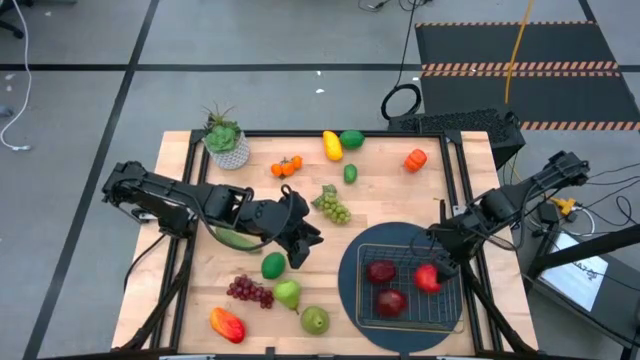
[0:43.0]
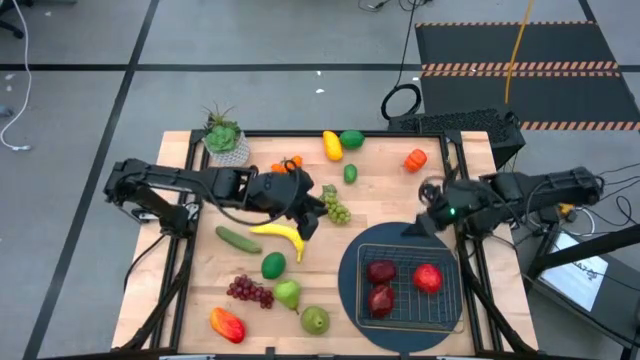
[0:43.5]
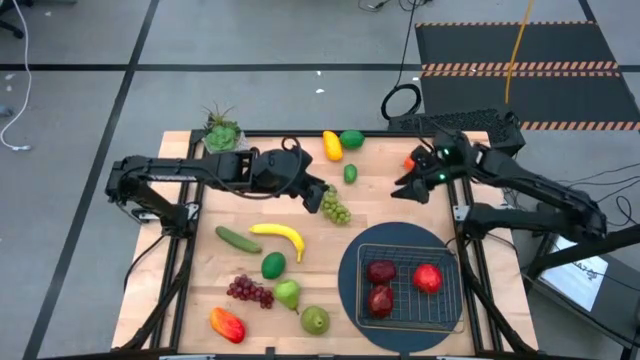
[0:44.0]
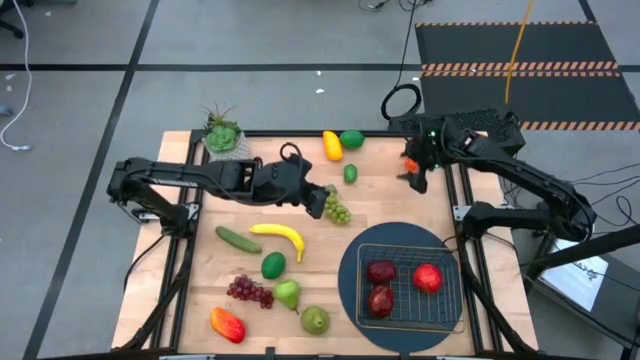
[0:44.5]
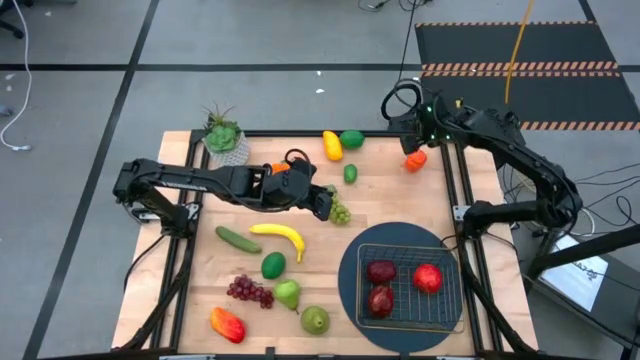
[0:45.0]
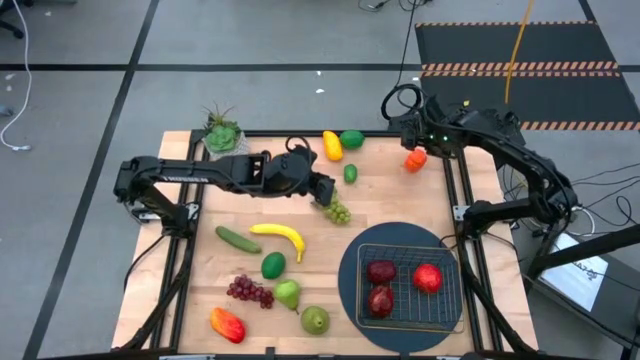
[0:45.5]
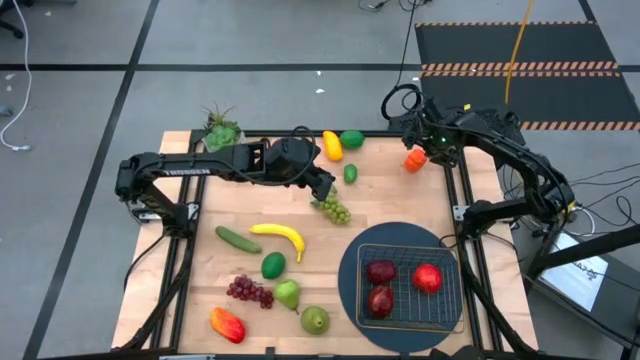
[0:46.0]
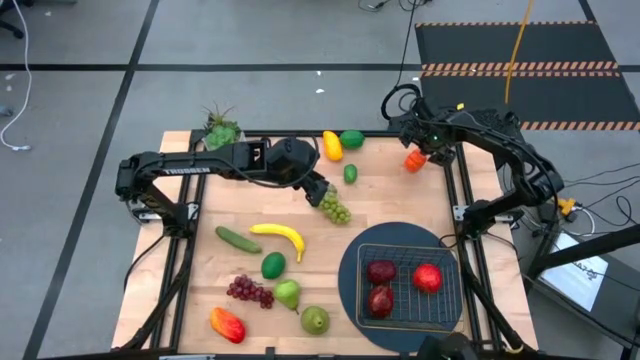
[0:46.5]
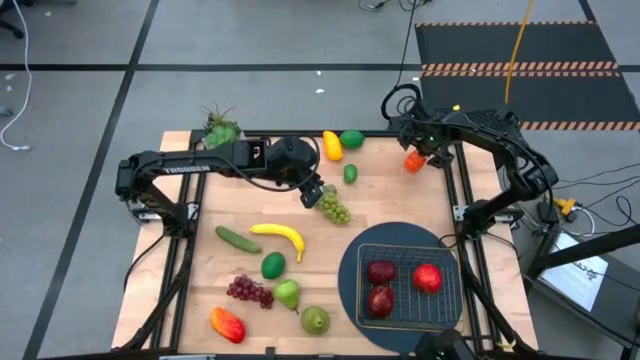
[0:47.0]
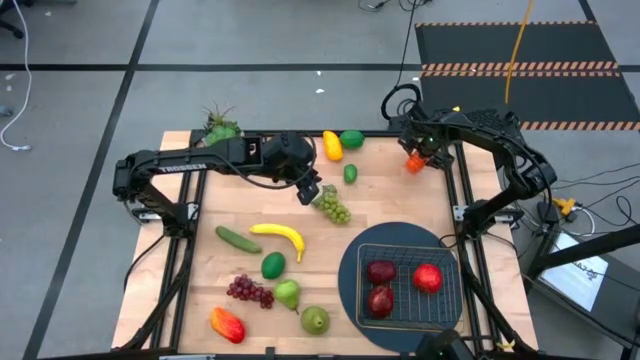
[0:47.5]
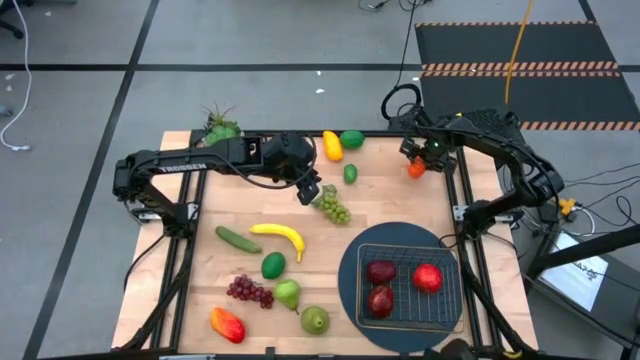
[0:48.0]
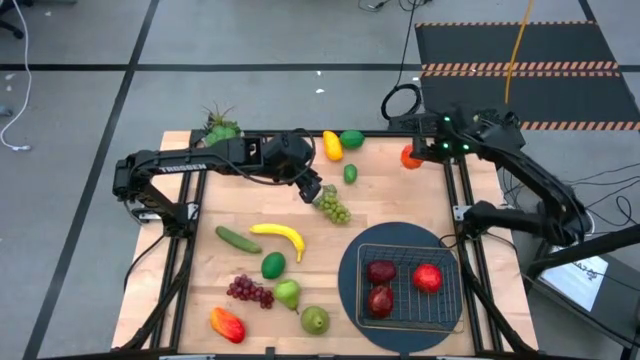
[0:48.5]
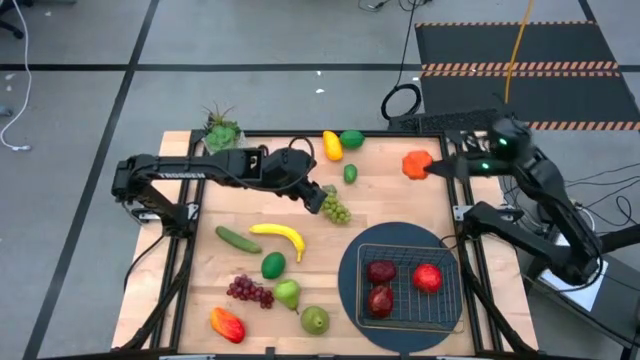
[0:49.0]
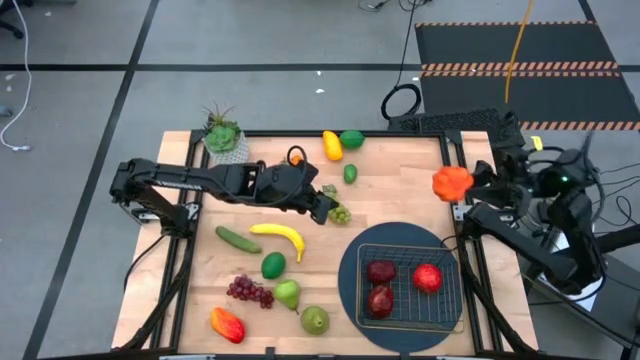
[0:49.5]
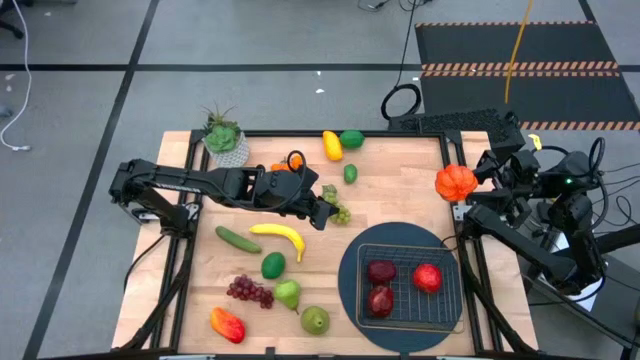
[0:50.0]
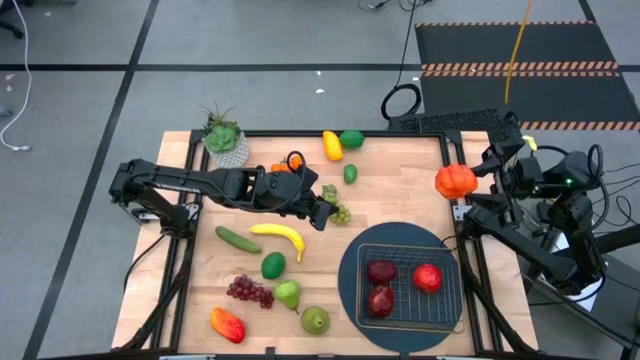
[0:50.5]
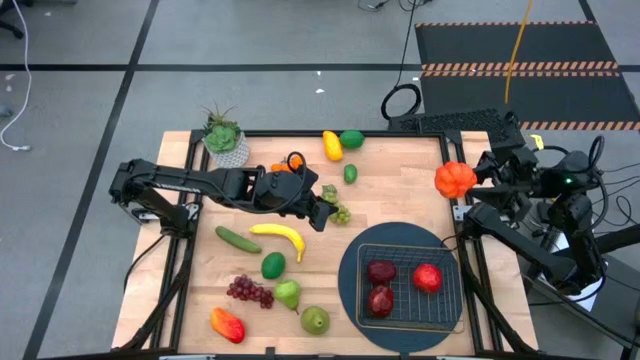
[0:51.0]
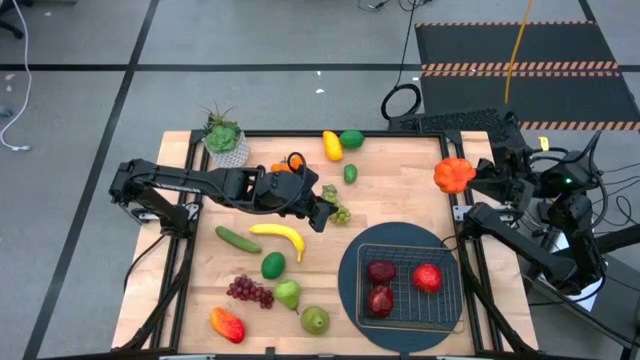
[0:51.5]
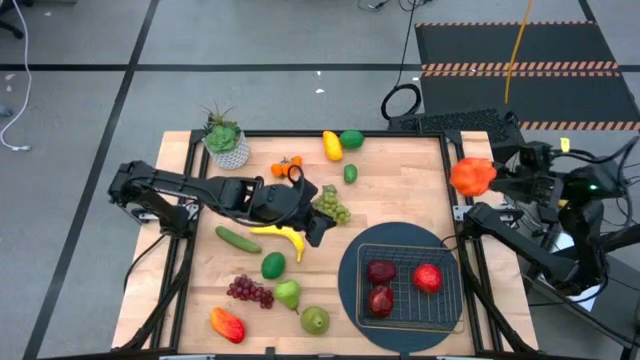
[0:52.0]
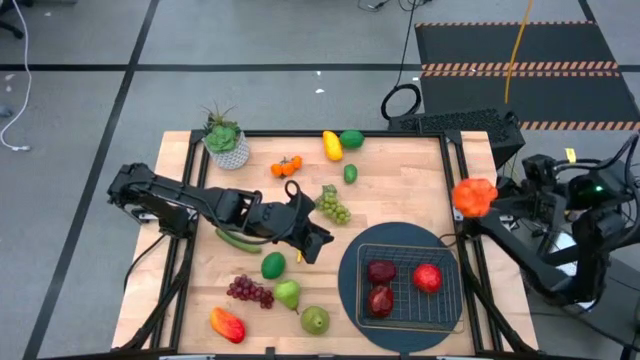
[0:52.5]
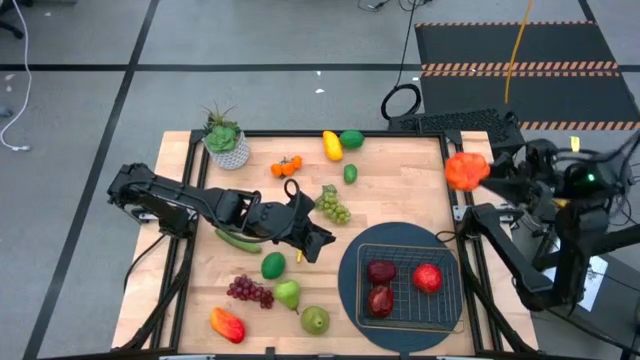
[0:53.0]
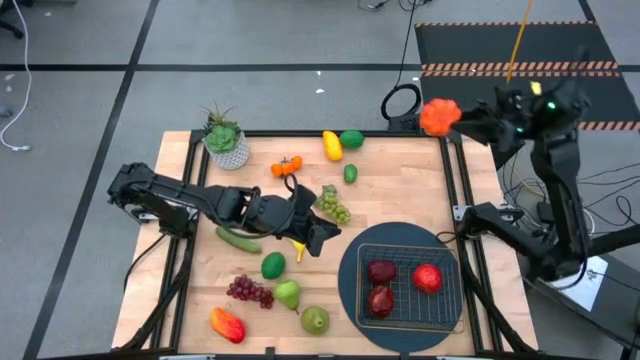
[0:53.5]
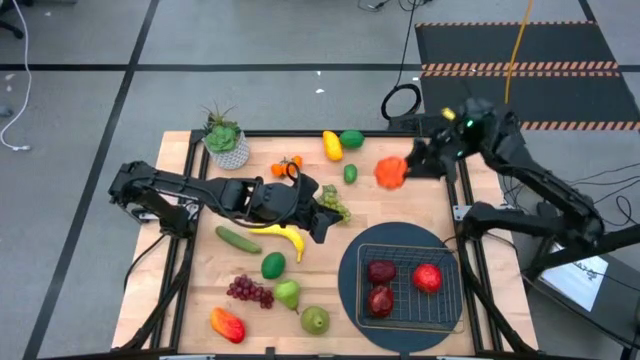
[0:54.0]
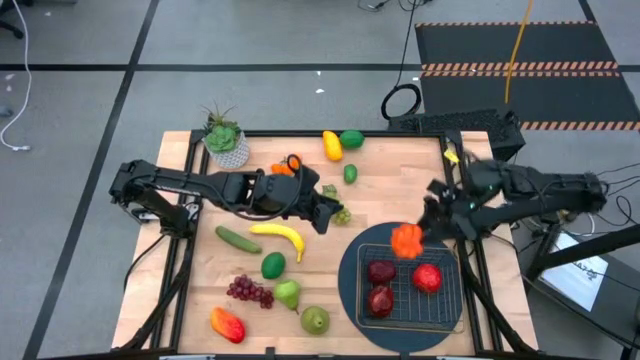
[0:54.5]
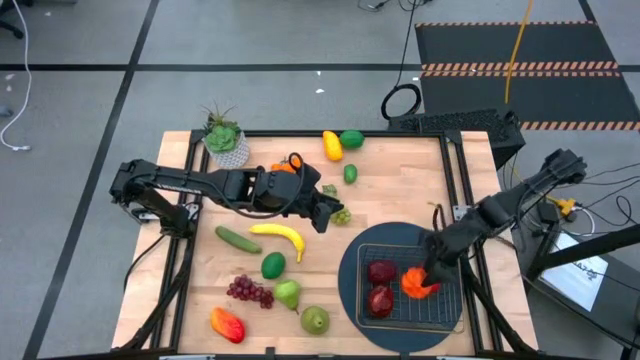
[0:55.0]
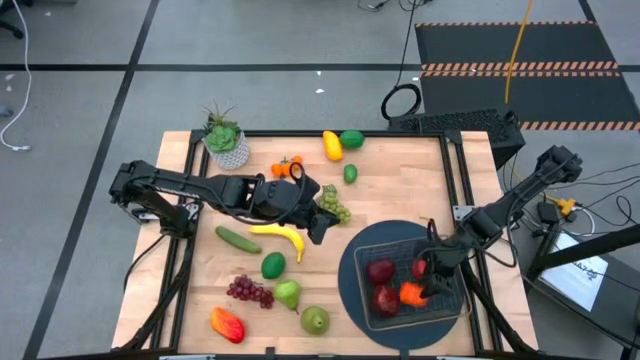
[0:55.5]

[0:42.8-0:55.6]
Task: Build produce basket
Put the pumpkin into the gold wire basket

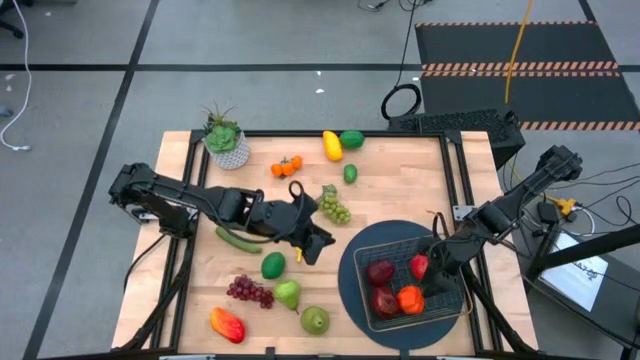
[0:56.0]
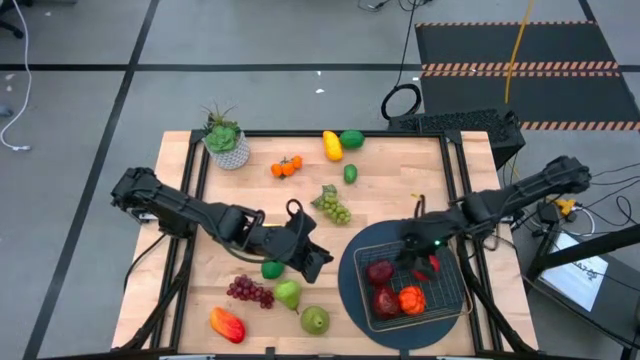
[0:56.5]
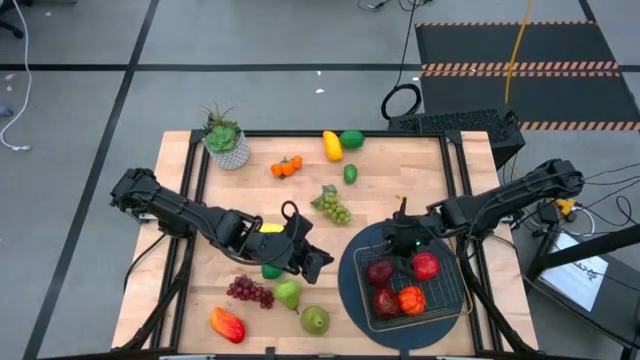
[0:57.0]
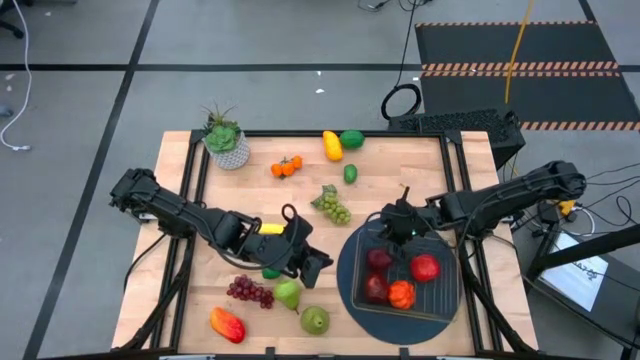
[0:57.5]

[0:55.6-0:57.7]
Adjust the gold wire basket on the blue placemat

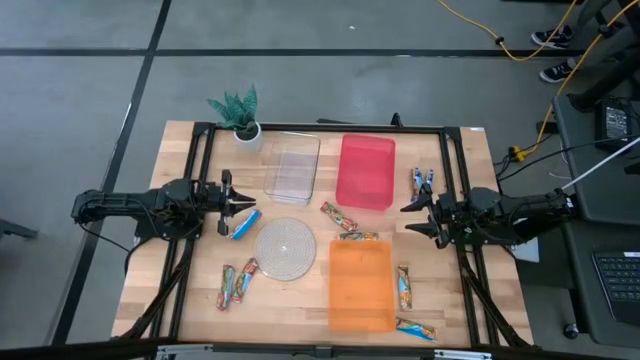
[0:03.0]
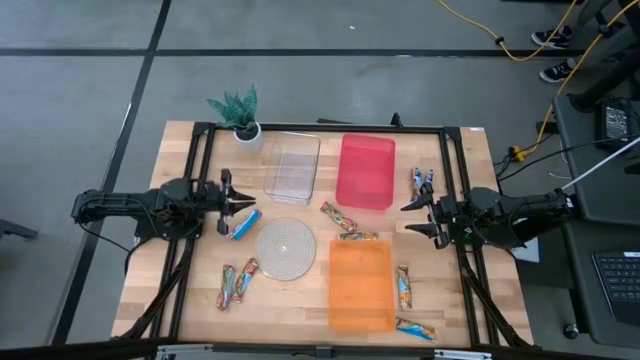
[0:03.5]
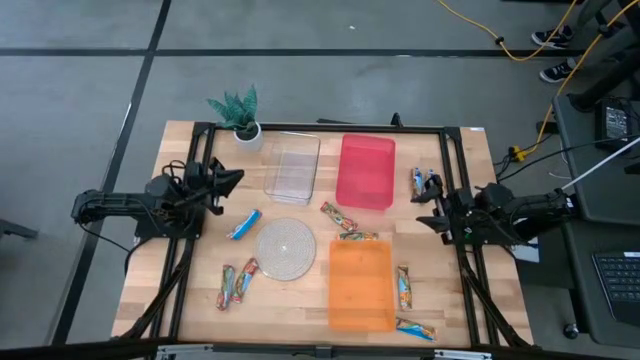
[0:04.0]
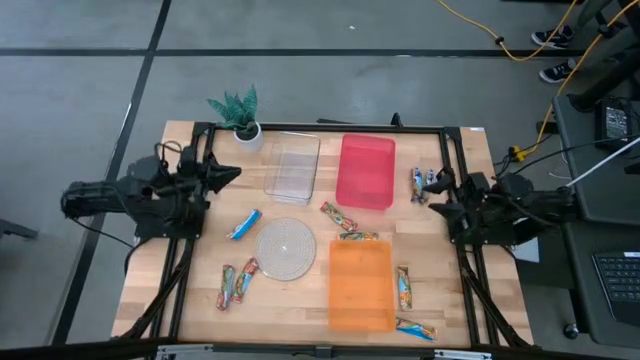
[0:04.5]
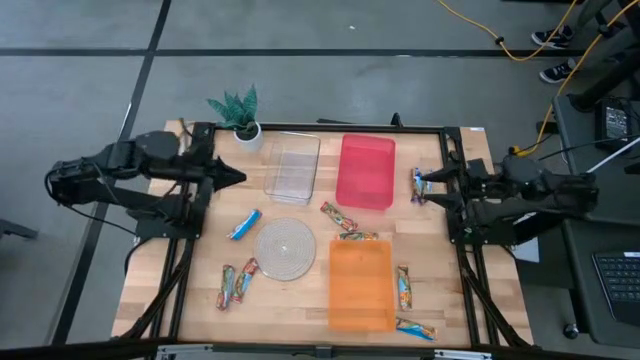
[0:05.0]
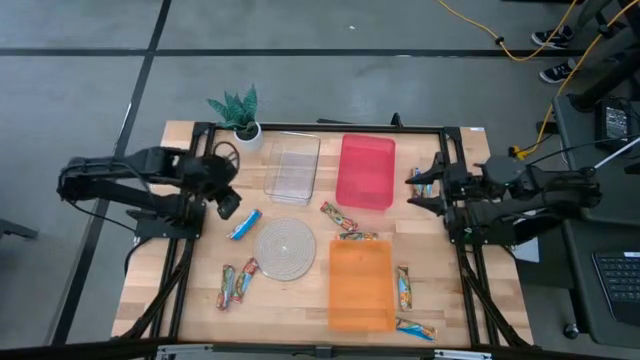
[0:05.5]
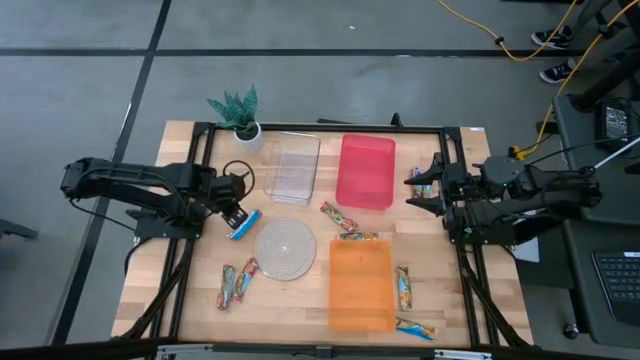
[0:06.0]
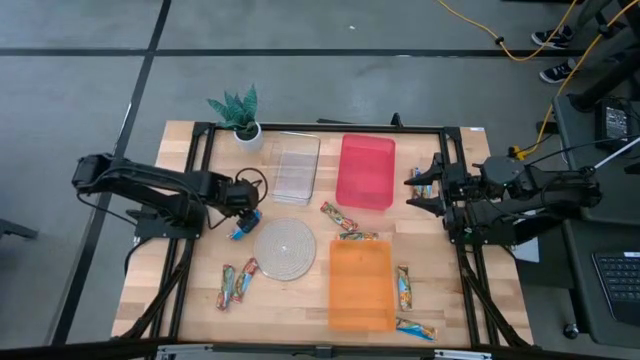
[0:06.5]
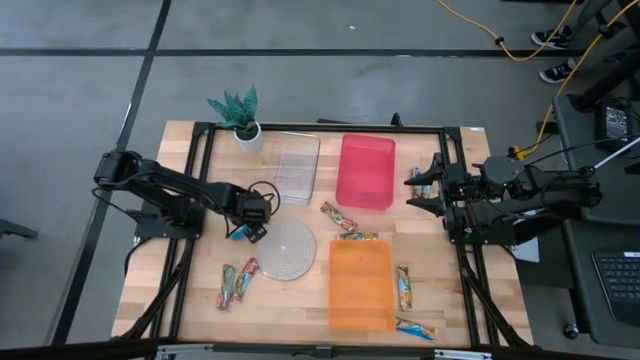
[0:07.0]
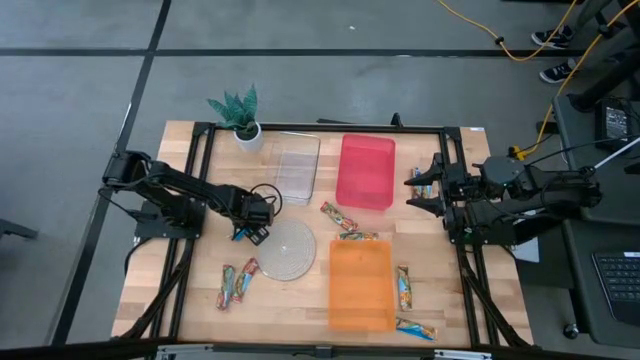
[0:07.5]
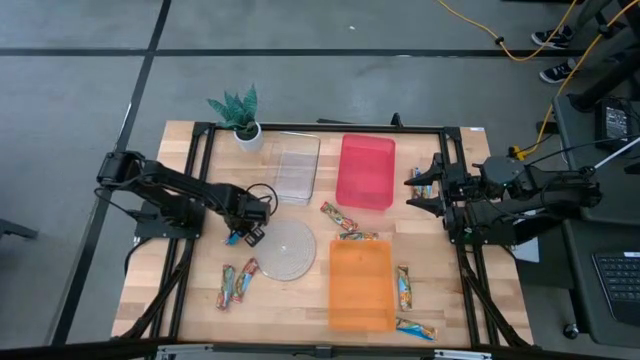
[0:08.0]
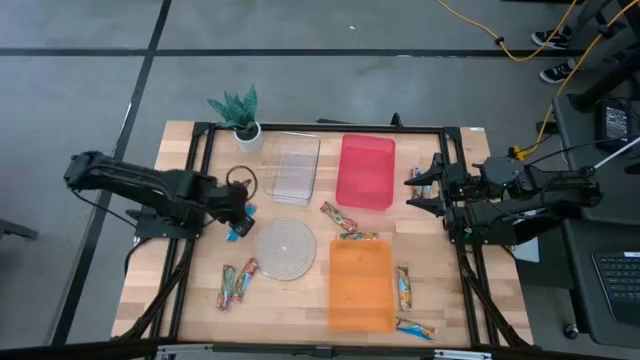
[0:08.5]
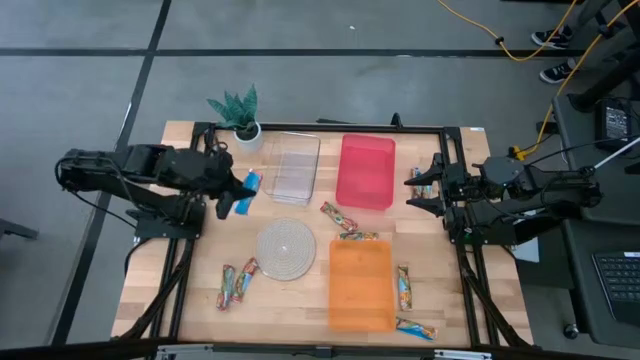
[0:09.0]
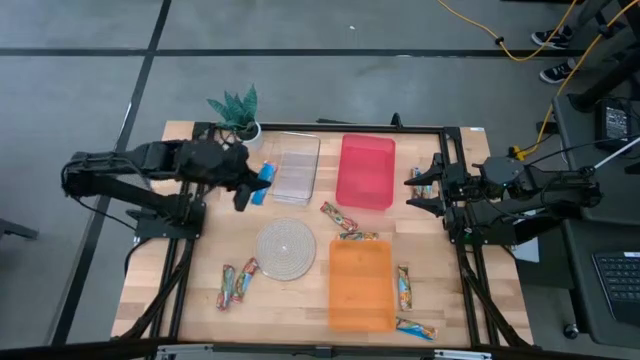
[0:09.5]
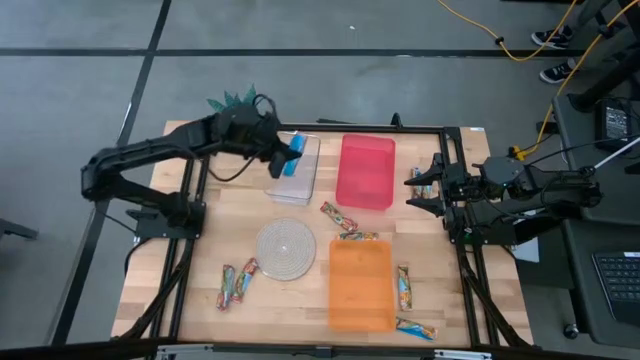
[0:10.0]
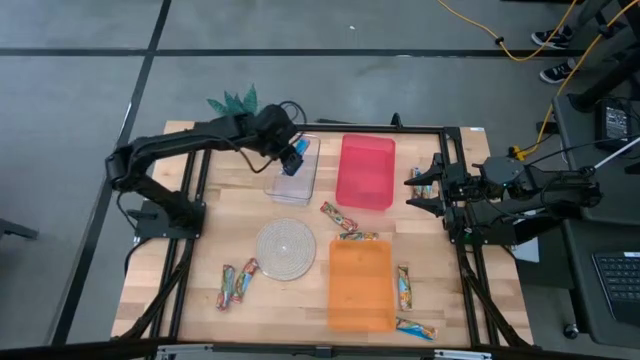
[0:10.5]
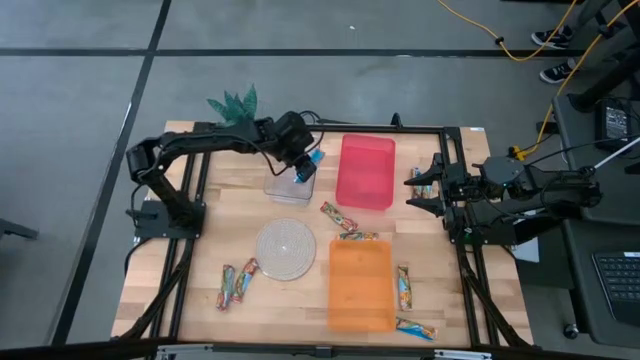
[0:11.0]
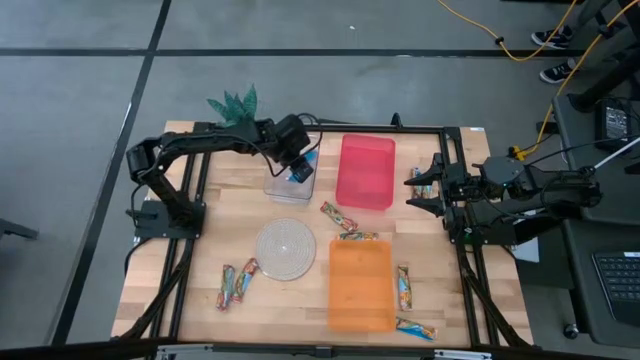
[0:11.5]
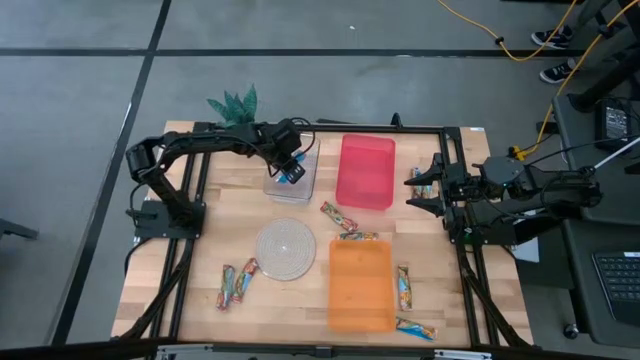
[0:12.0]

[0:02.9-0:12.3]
Task: Pick and place Granola Bars by type
Put the red granola bar into the transparent bin
